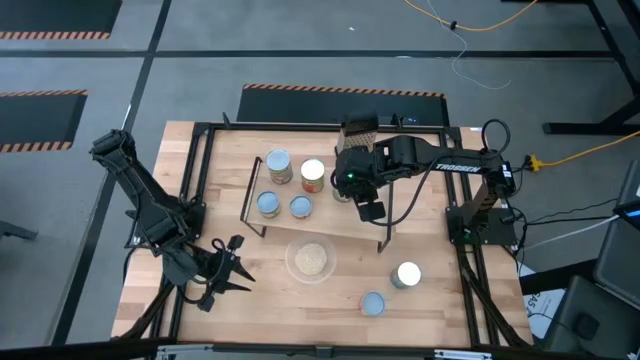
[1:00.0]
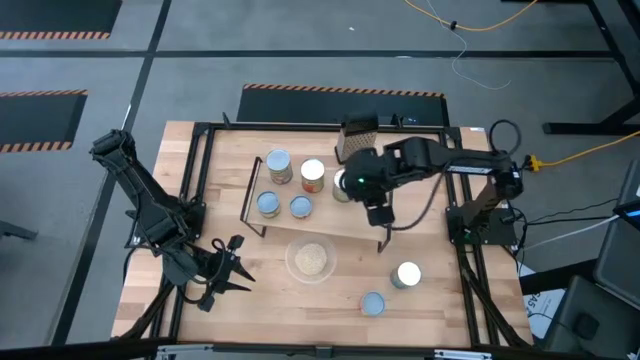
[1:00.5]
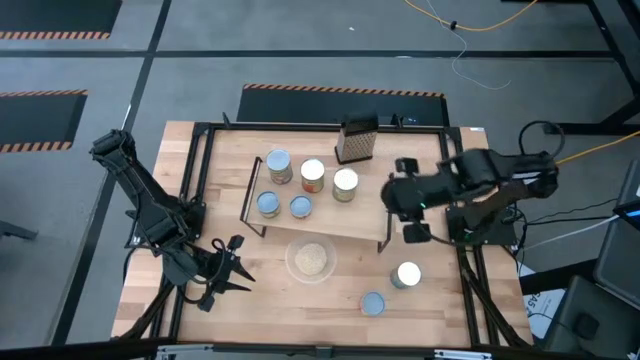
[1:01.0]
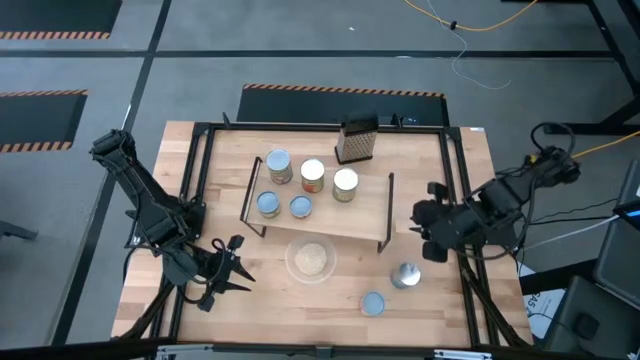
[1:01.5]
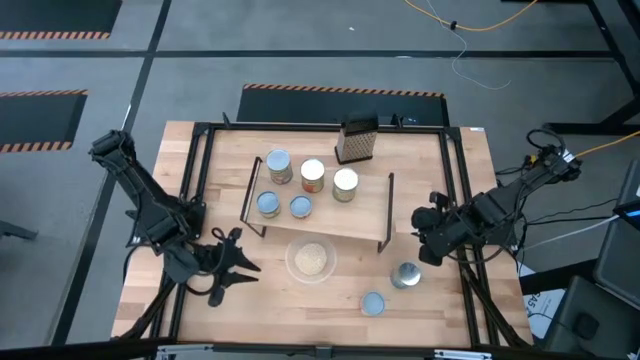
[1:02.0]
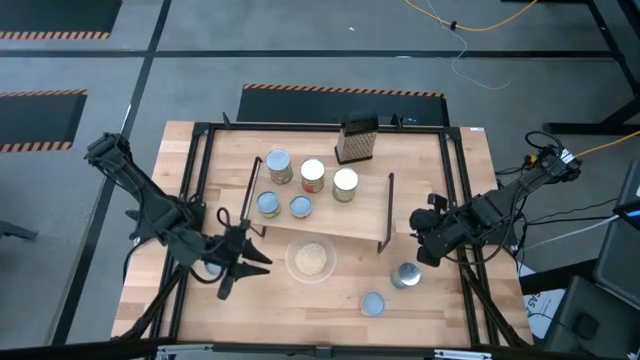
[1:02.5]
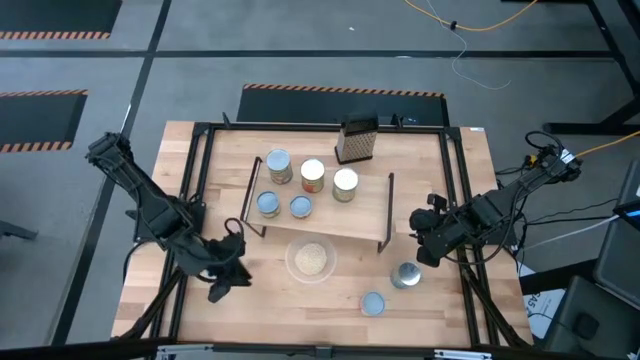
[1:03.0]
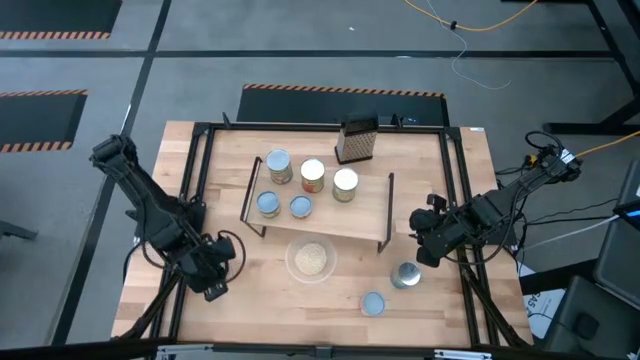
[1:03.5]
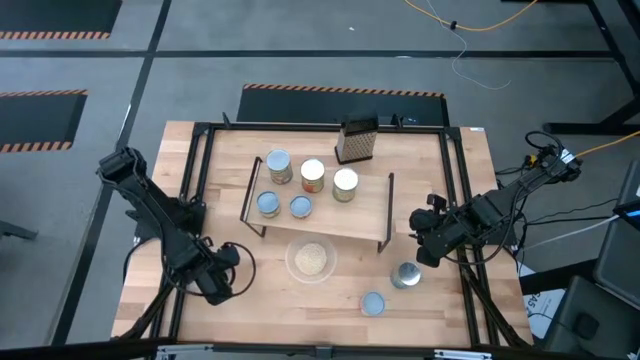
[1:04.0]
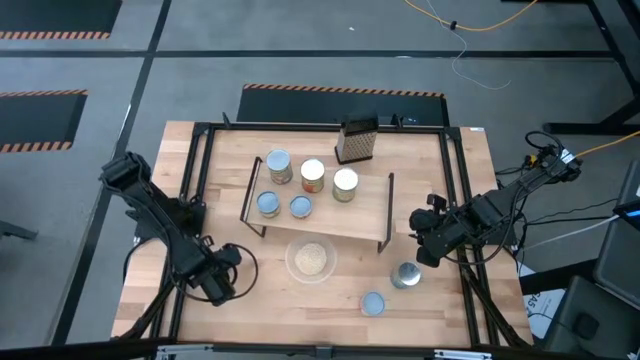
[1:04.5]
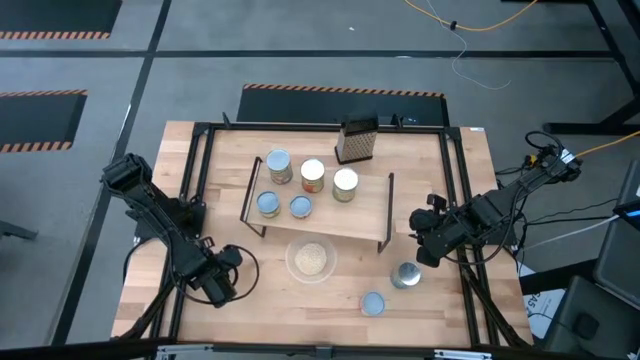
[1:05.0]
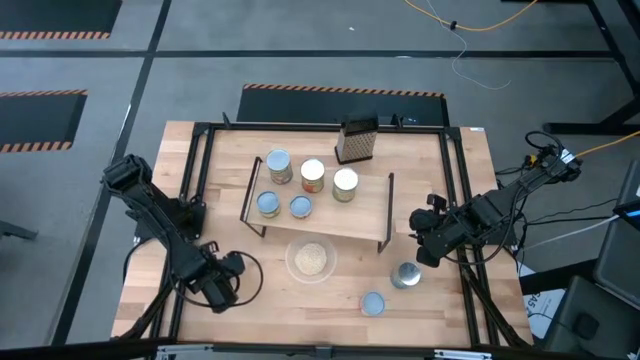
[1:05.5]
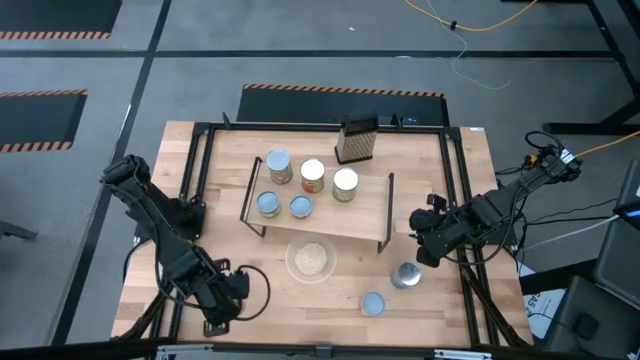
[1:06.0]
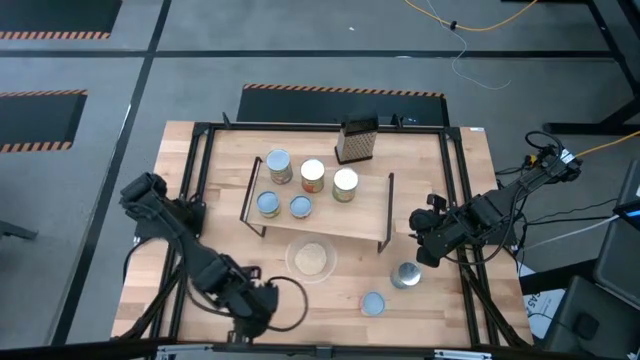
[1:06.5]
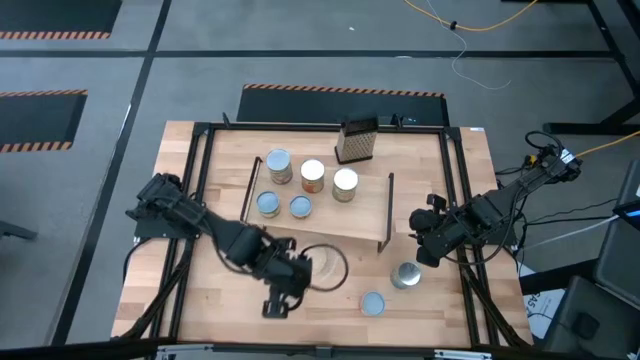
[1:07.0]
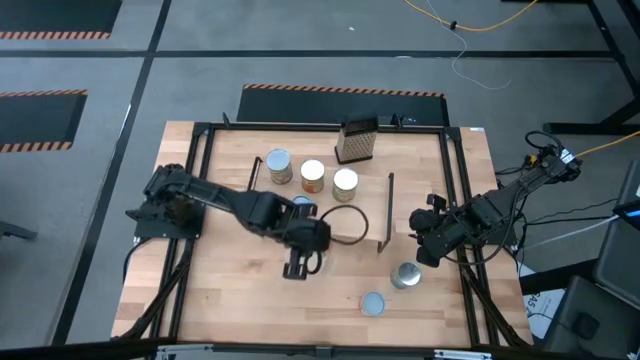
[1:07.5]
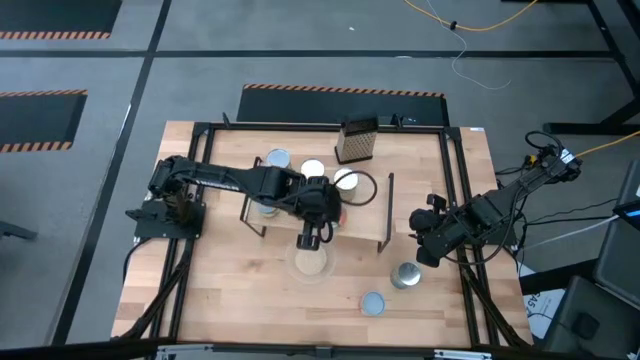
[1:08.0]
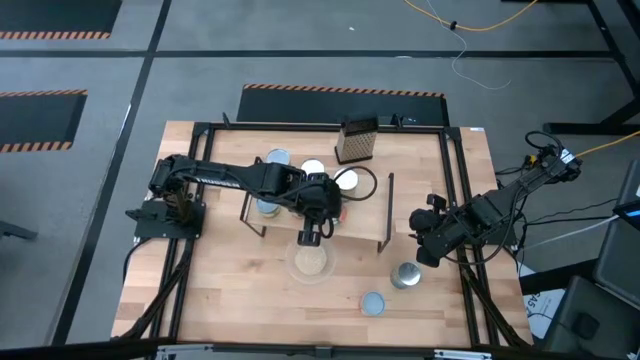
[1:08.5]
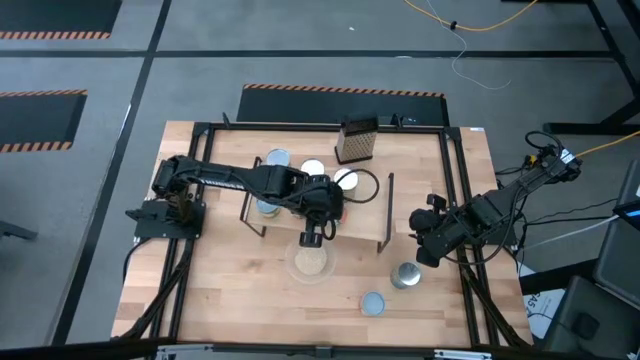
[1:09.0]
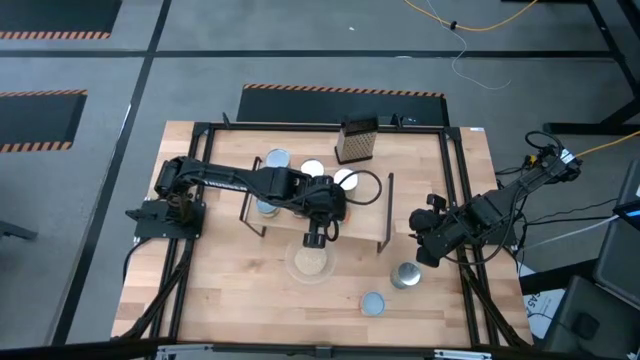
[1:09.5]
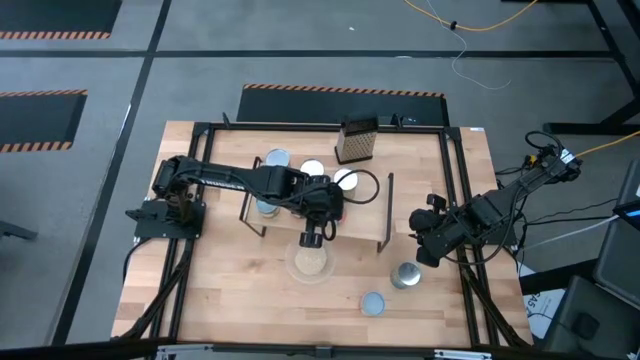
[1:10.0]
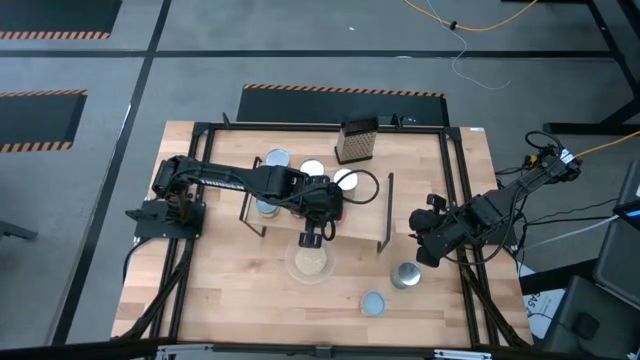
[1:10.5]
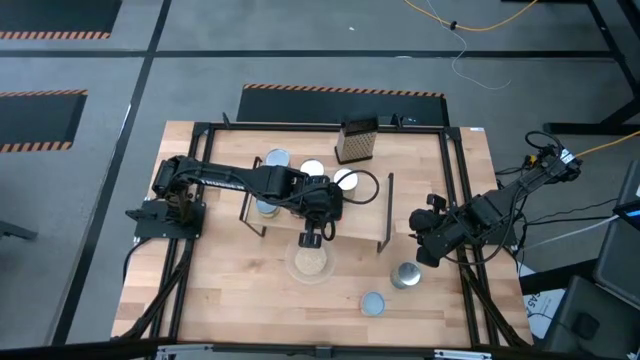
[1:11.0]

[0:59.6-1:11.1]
Task: Pick and place cans onto a shelf
Put the small canned oranges on the shelf

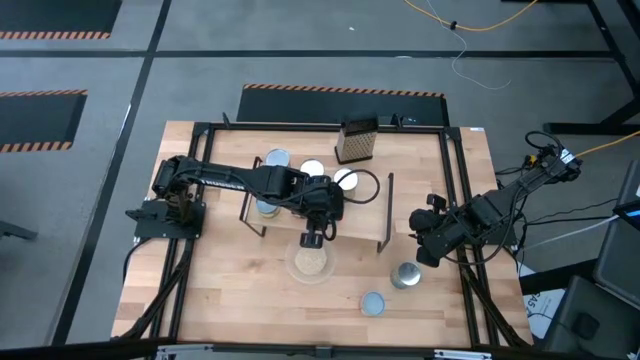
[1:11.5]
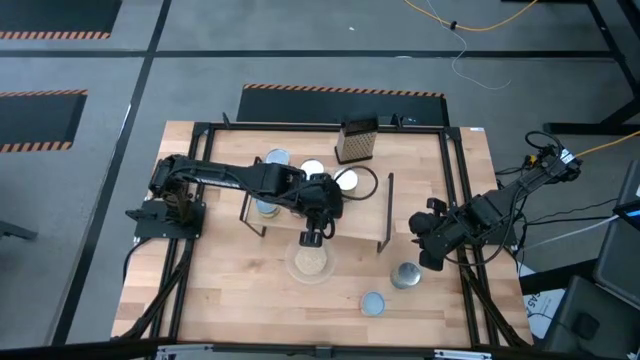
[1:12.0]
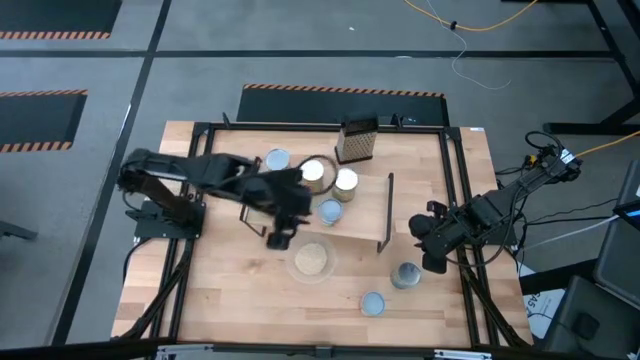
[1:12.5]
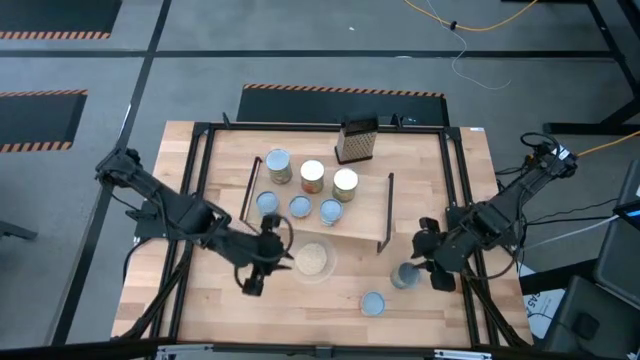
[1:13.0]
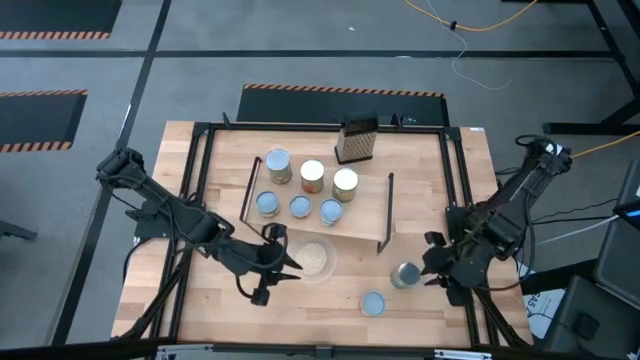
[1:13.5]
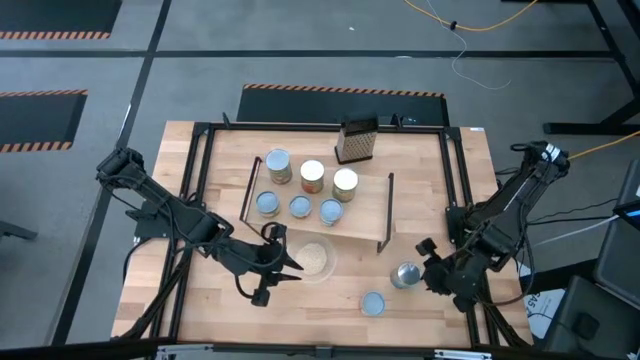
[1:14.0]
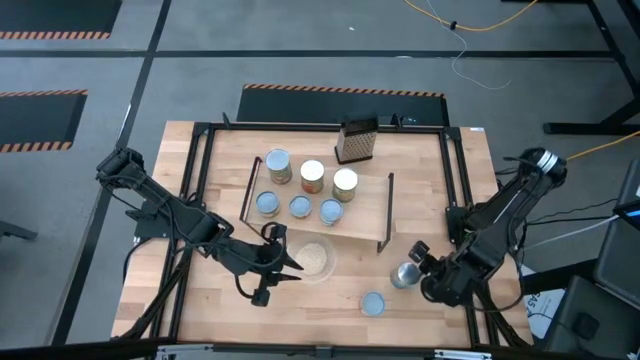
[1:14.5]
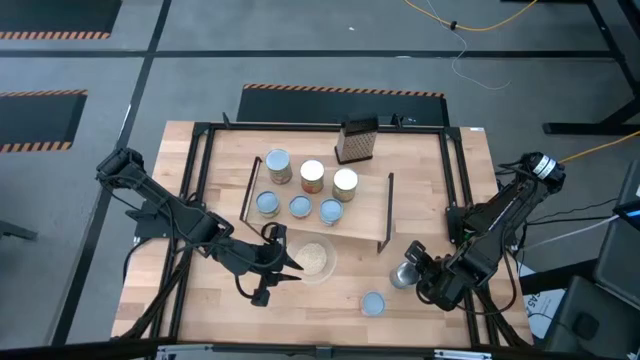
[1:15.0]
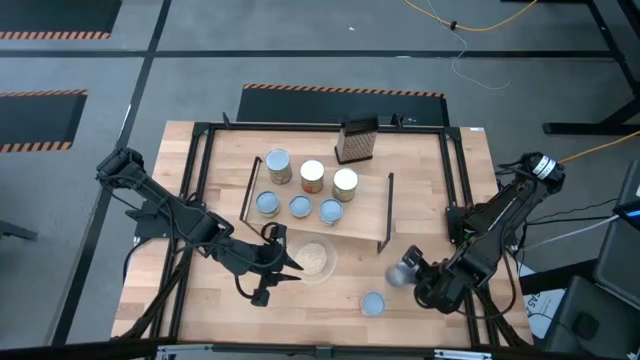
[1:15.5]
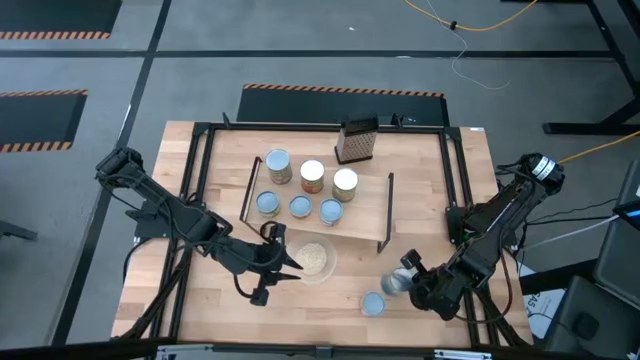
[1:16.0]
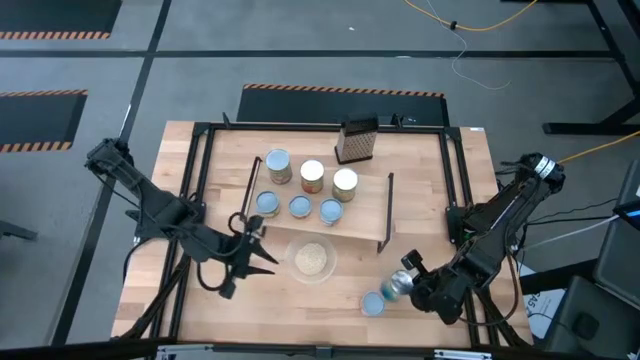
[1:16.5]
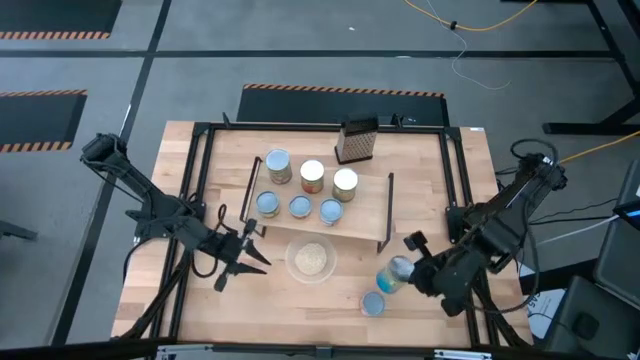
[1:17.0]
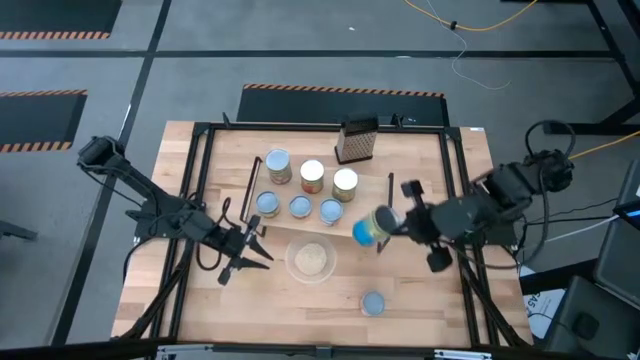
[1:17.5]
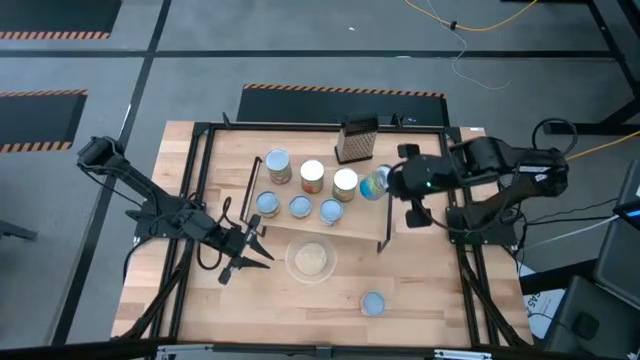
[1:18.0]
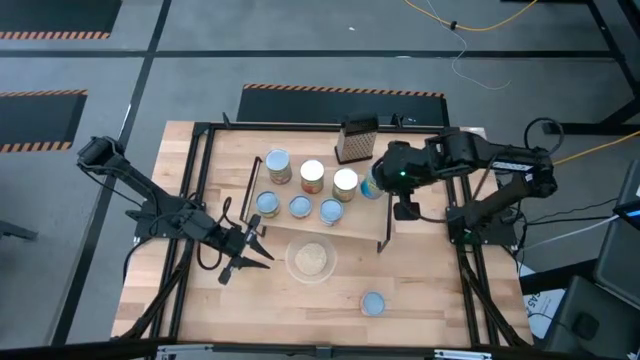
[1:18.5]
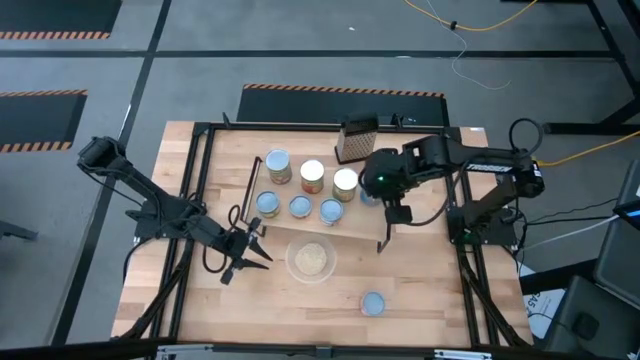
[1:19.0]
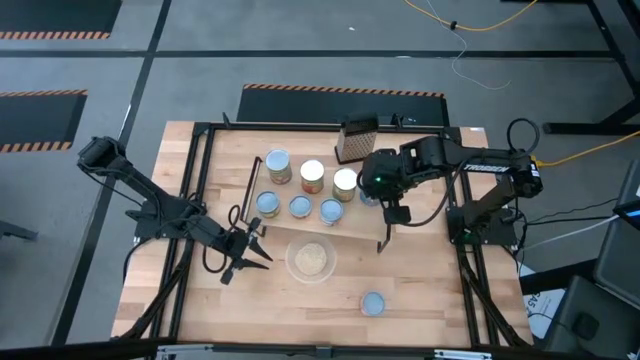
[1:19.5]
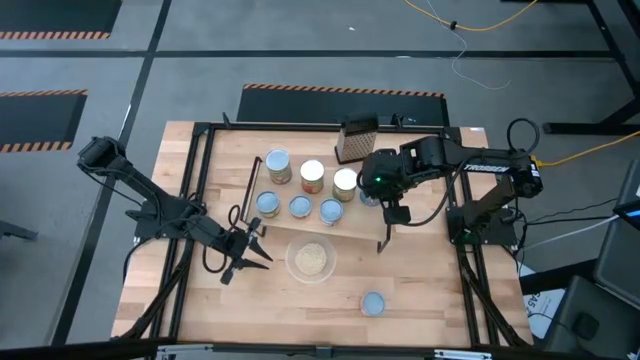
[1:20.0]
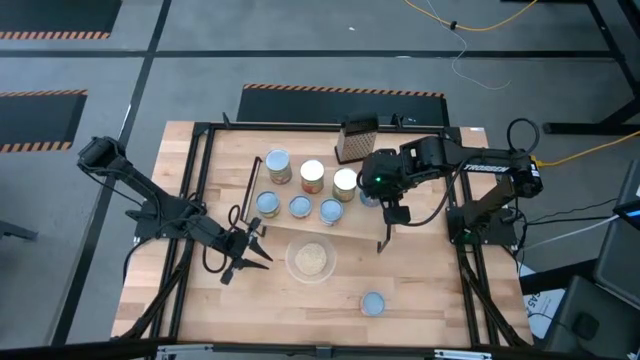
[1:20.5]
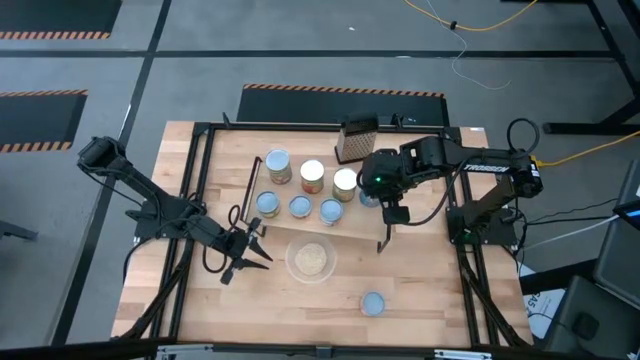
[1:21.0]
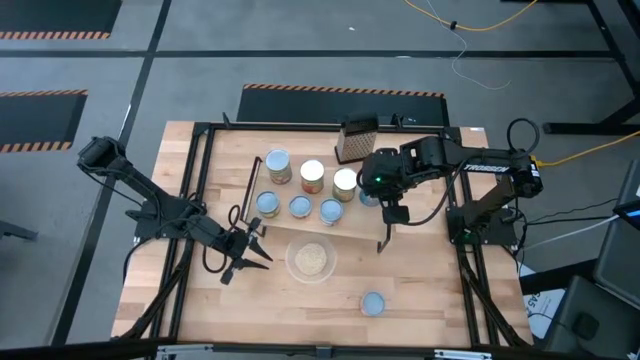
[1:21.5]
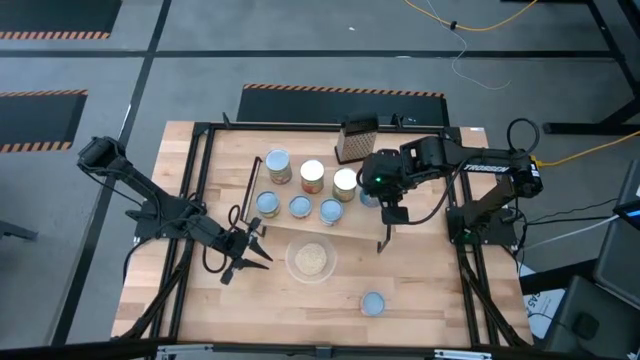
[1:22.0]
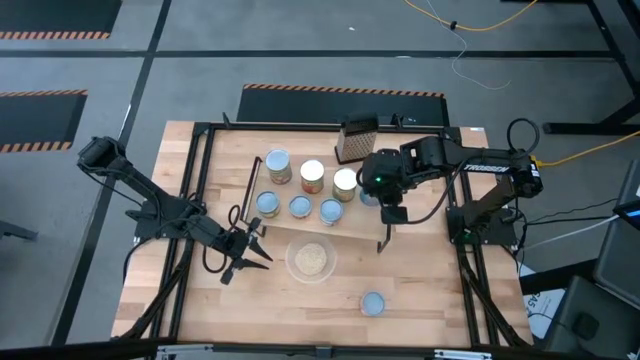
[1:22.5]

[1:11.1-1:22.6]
Put the canned cherries on the shelf
